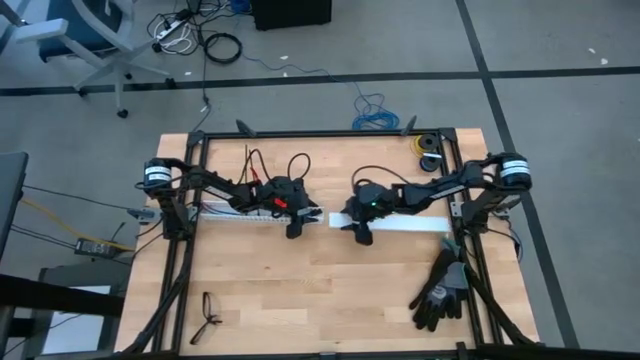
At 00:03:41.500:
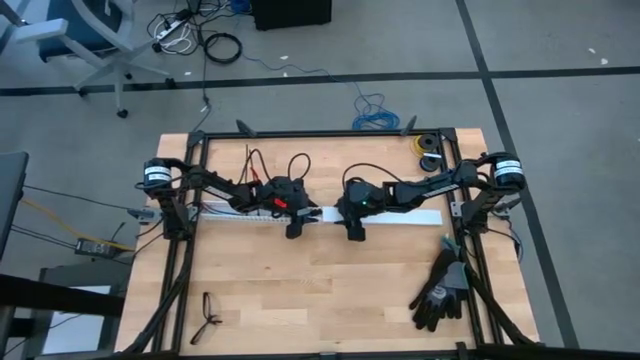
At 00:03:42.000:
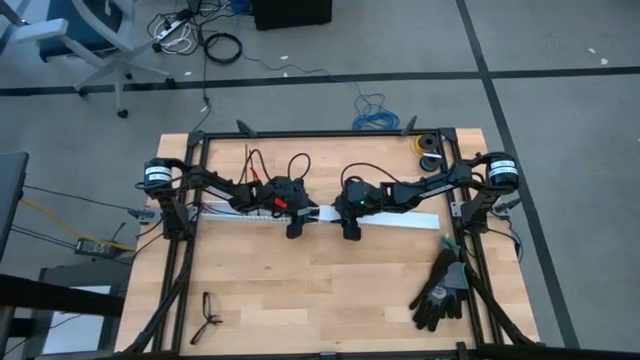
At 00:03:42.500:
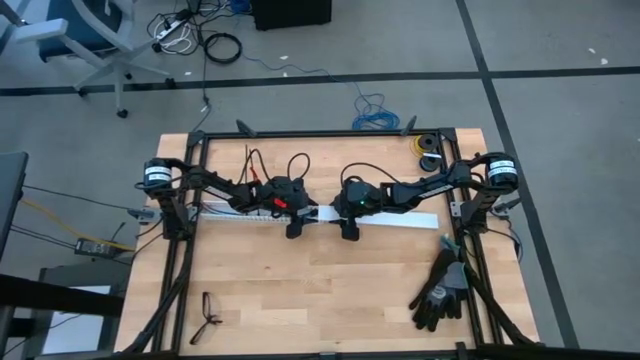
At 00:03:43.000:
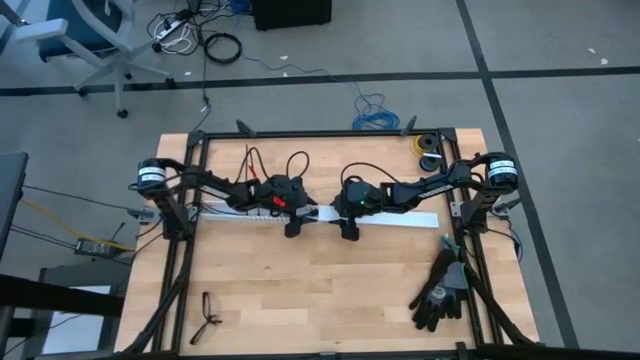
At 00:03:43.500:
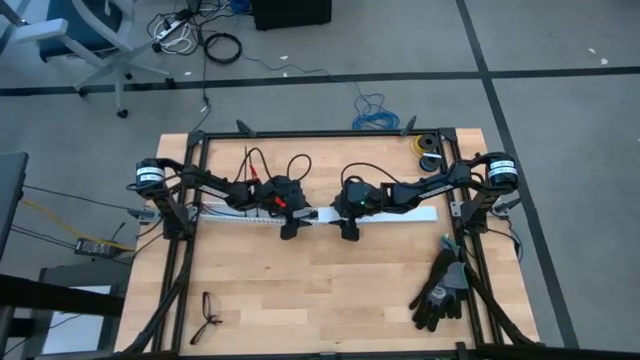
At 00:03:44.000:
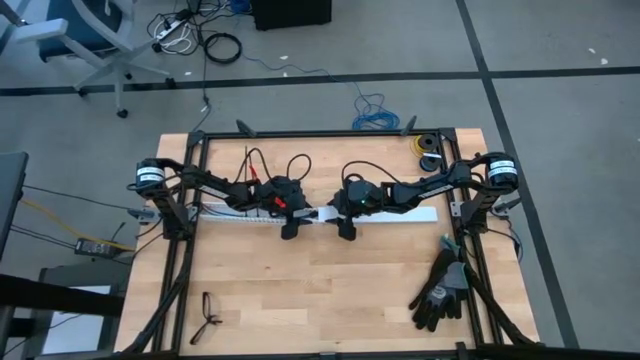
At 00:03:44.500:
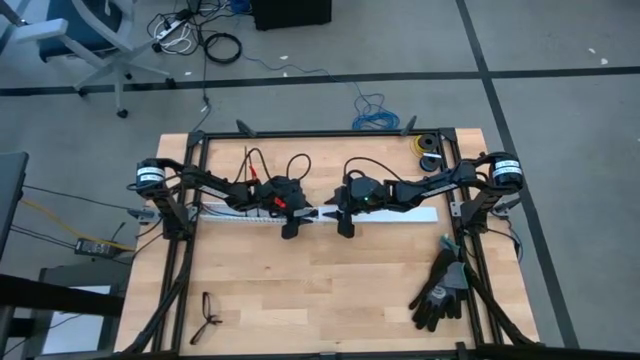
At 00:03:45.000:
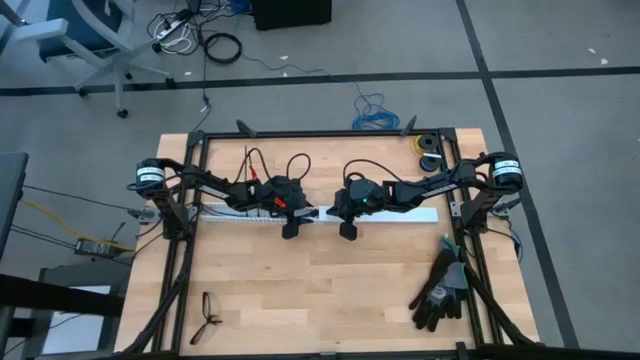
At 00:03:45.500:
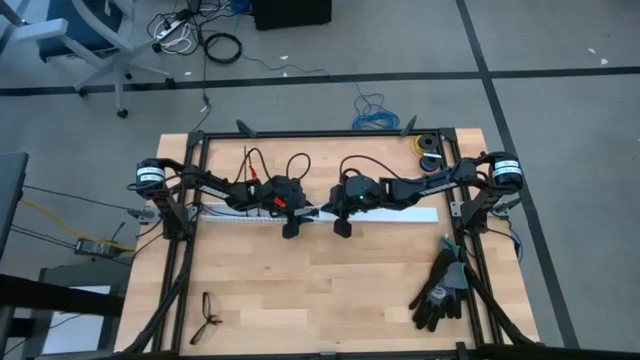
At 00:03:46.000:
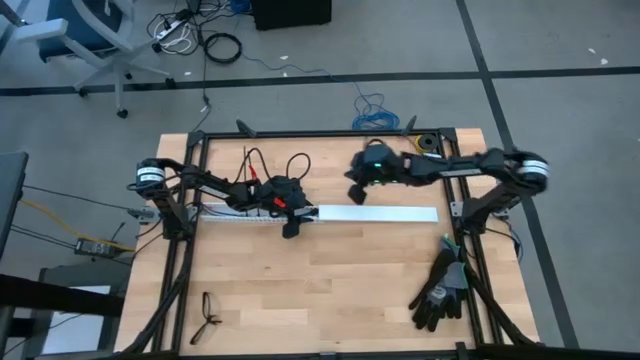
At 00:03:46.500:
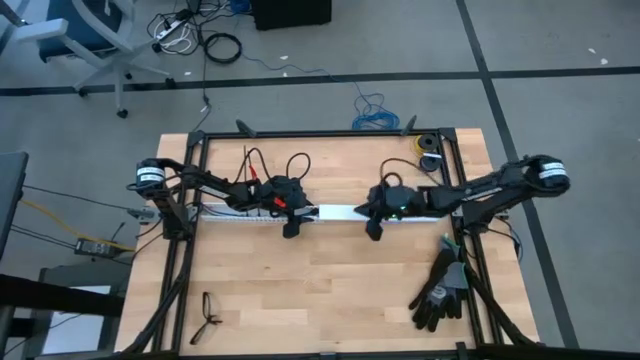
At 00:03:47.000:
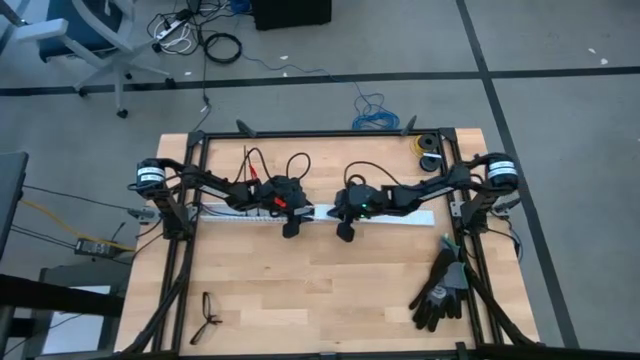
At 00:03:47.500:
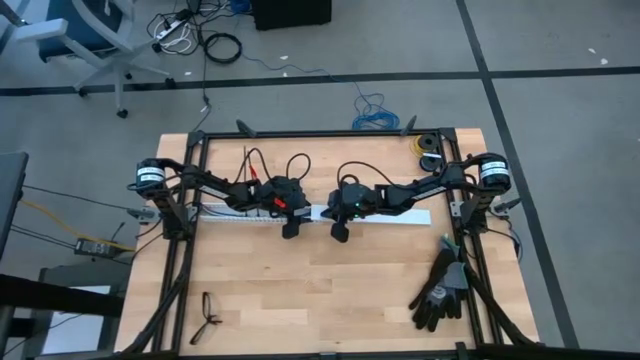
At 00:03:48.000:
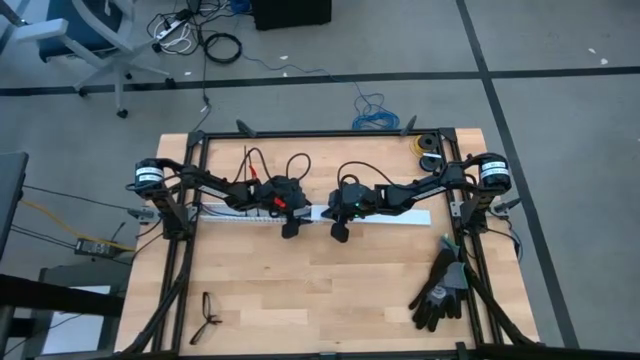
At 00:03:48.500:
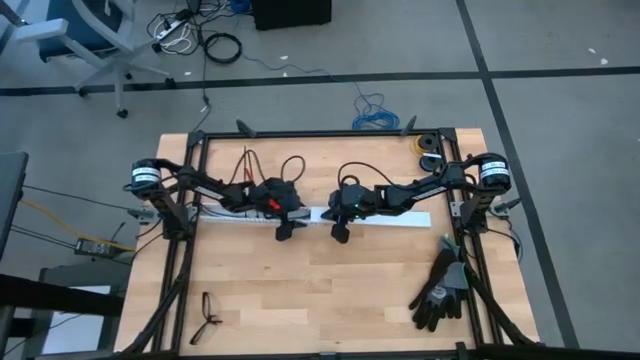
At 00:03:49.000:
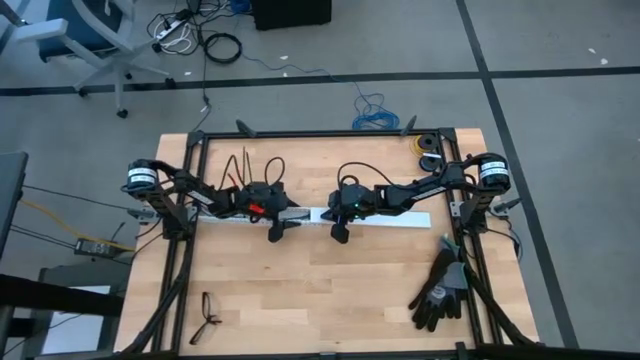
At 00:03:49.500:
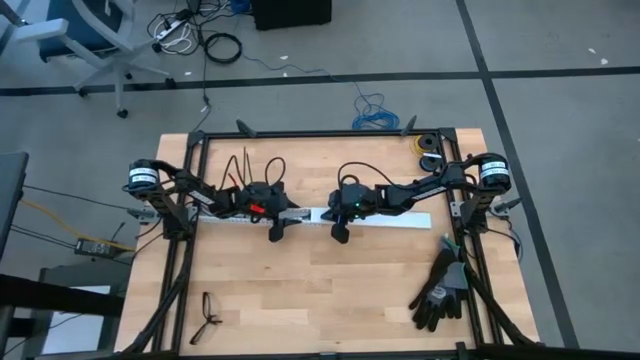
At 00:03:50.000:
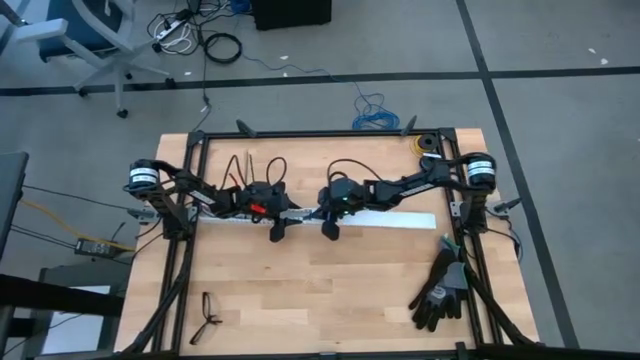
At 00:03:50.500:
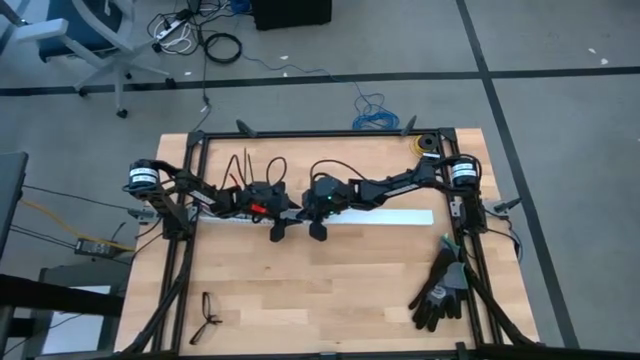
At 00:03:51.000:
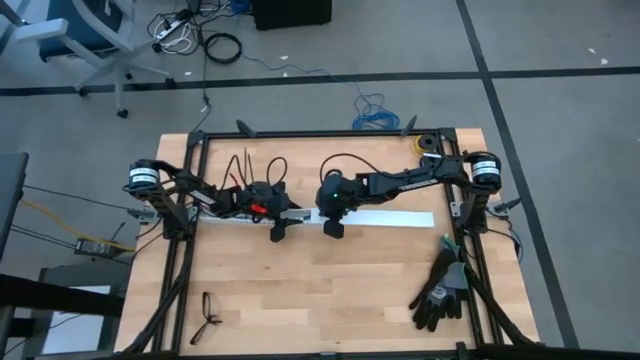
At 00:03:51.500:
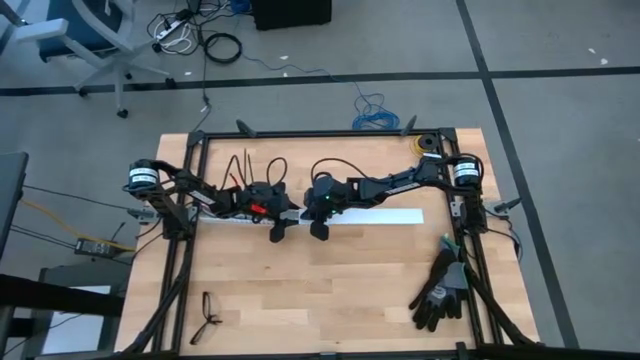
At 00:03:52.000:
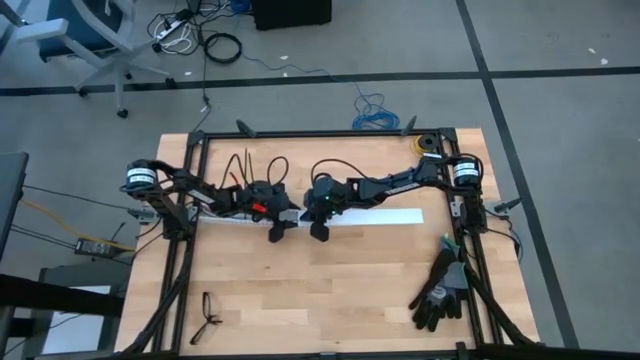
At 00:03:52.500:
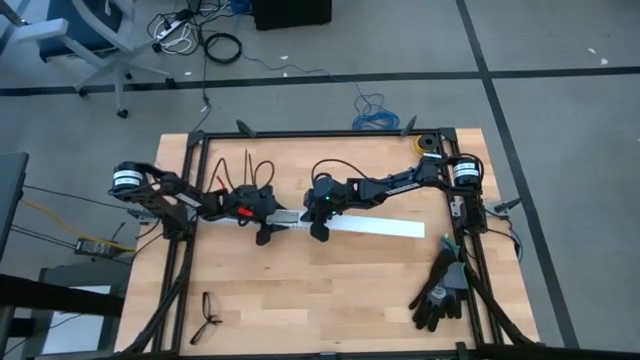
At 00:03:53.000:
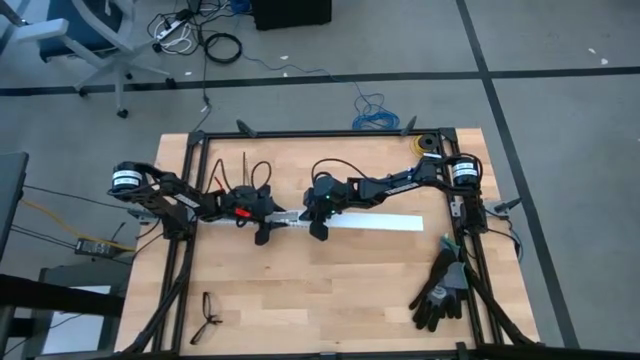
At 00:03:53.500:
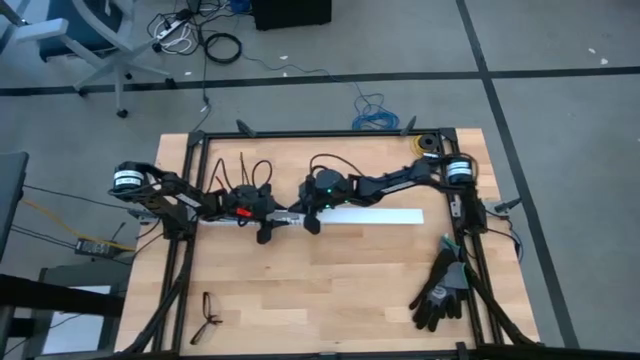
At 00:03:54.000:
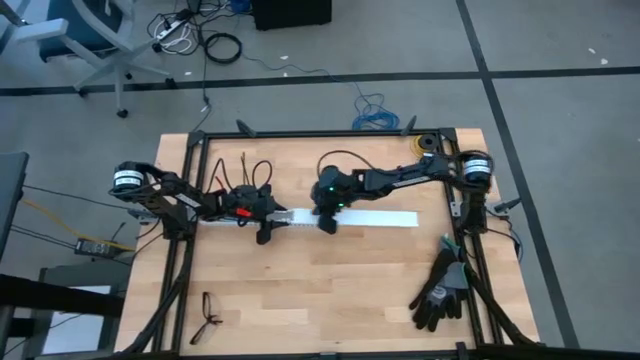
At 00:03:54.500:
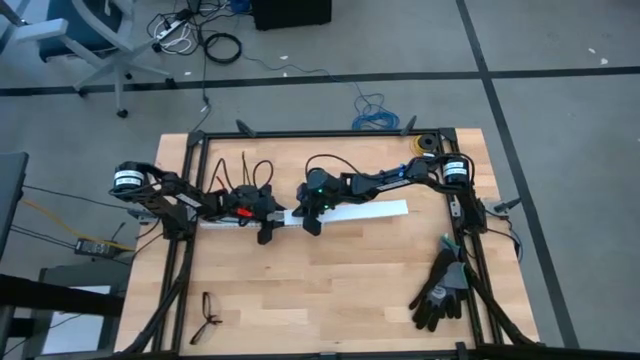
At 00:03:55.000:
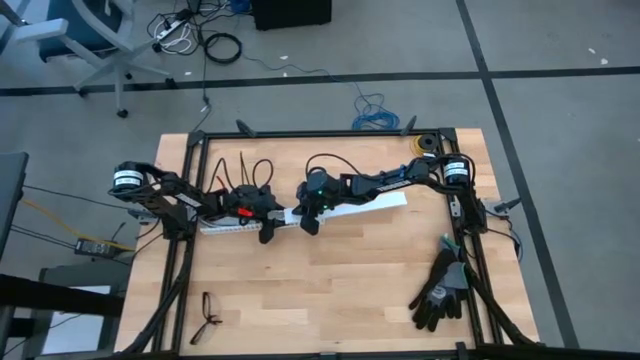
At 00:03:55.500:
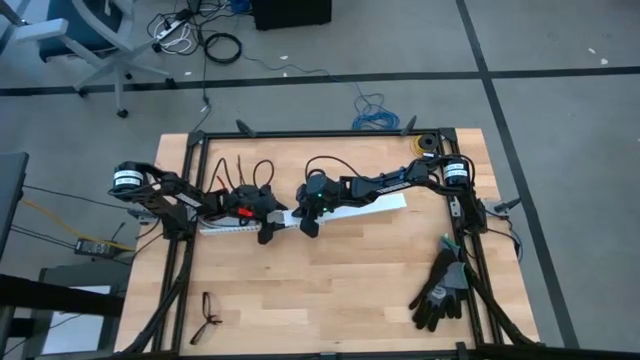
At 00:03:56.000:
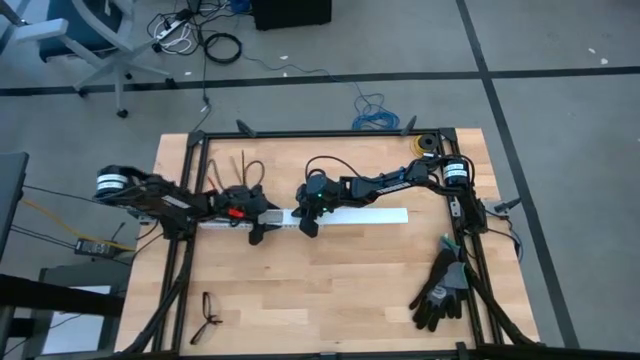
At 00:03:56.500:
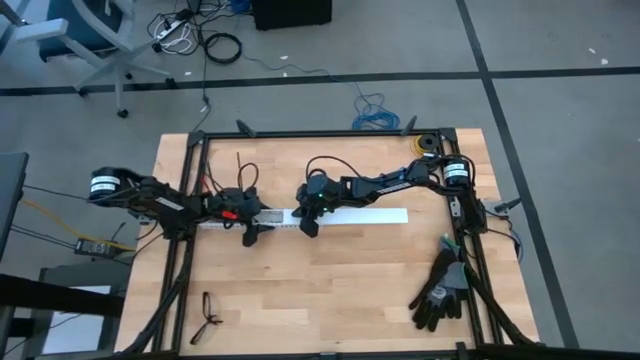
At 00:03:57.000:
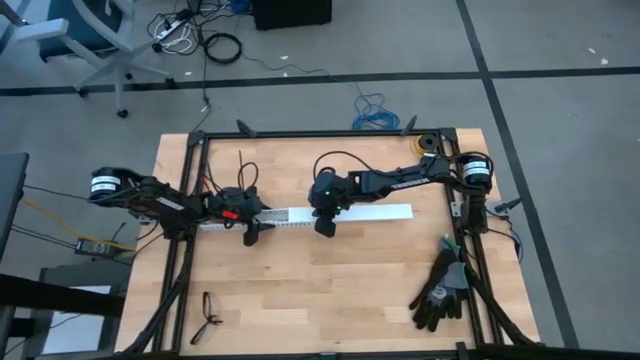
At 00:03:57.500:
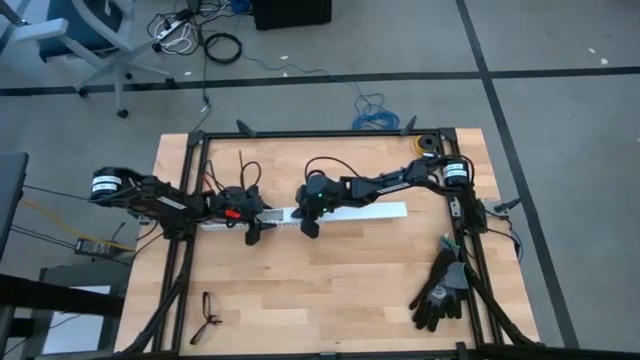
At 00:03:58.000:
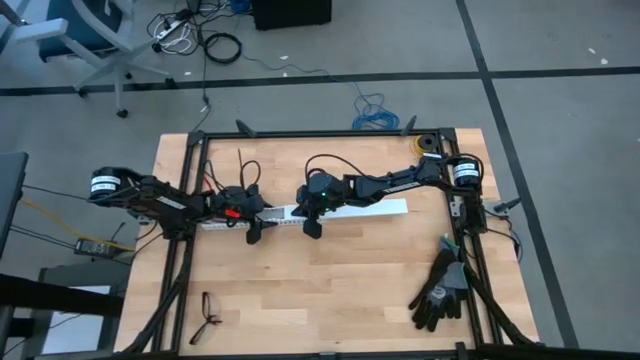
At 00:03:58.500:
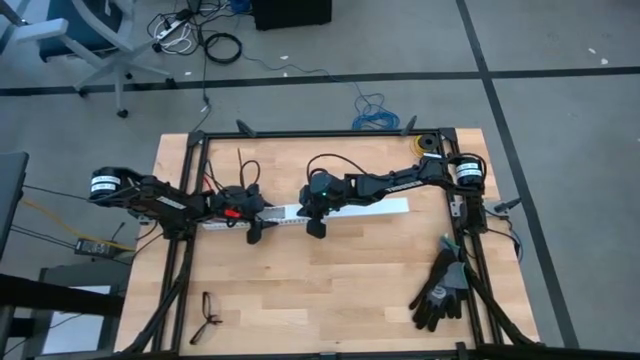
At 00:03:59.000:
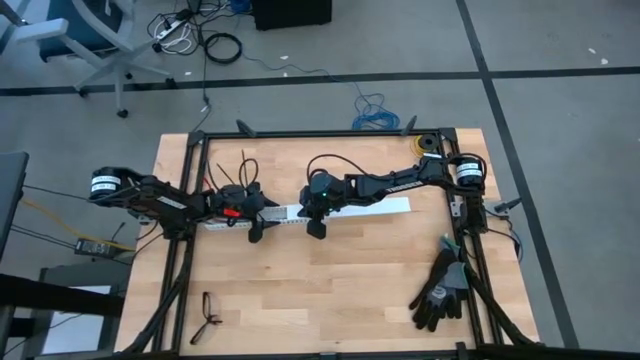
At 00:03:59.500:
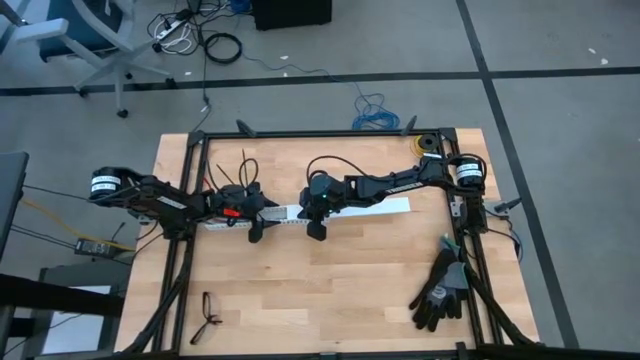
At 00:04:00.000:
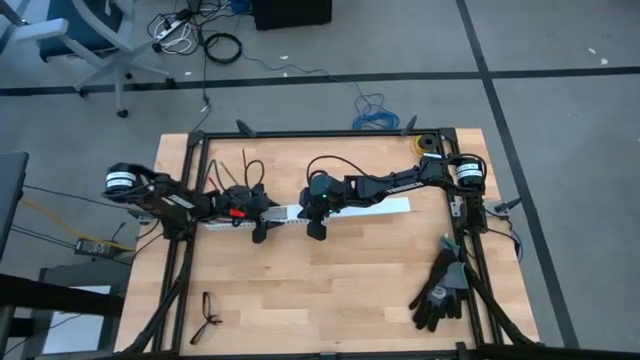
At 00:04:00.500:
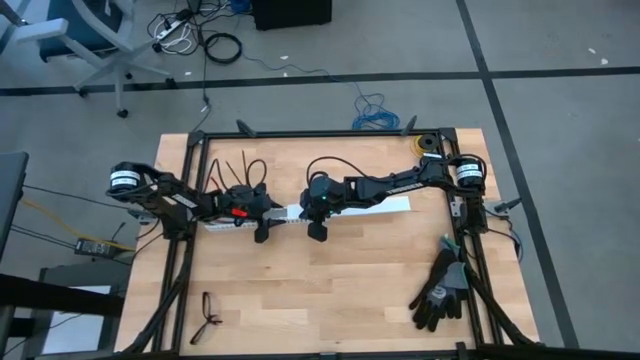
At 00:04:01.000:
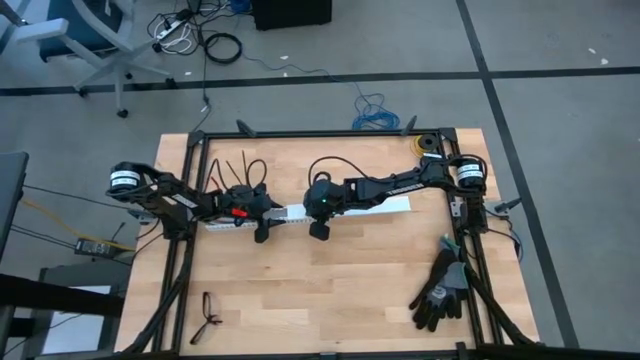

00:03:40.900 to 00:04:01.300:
Task: Ziptie cables
Close the white cable duct with the white cable duct cover
